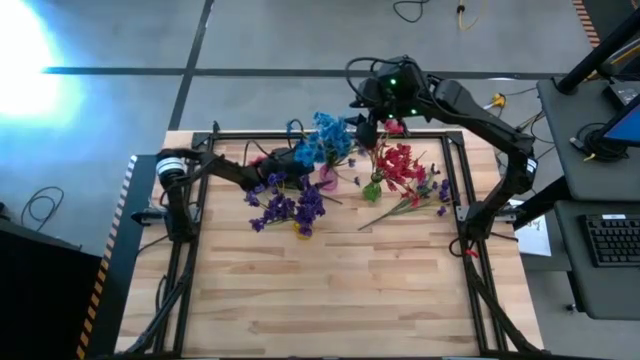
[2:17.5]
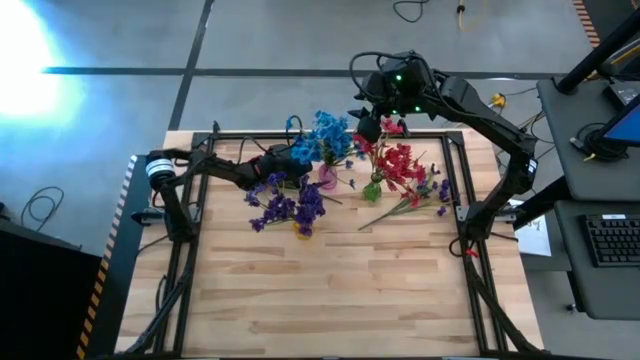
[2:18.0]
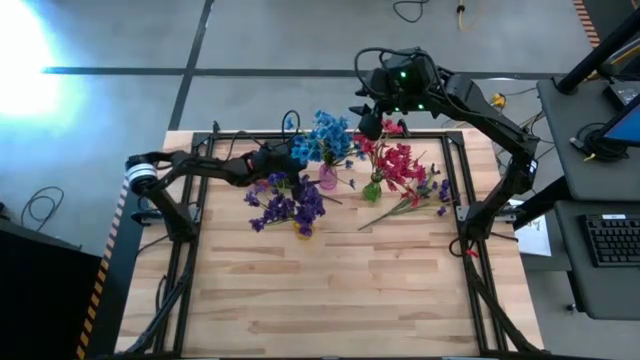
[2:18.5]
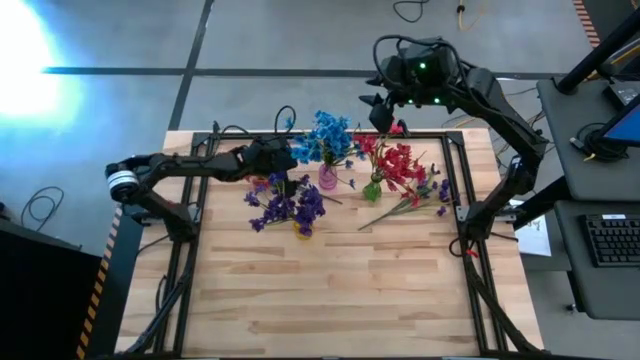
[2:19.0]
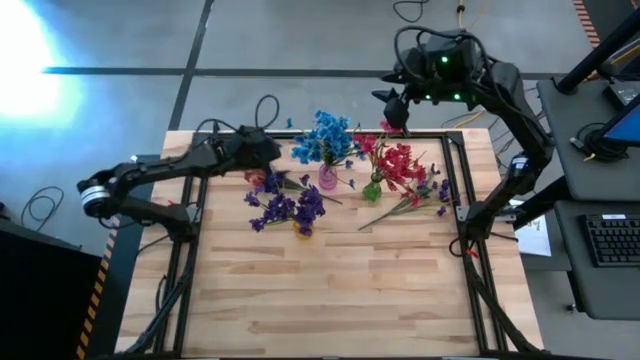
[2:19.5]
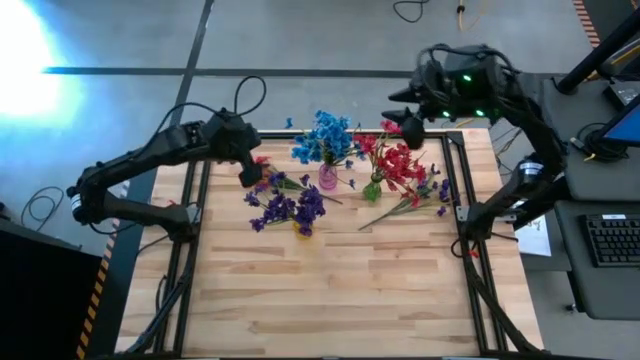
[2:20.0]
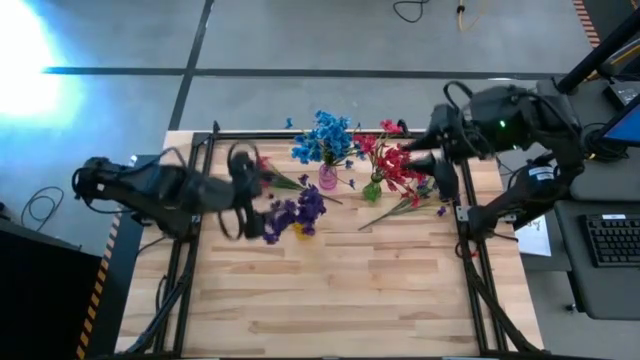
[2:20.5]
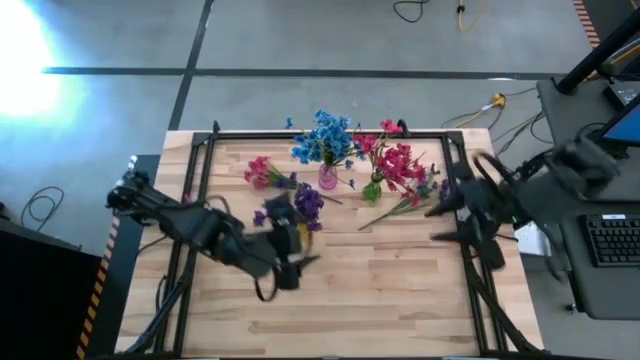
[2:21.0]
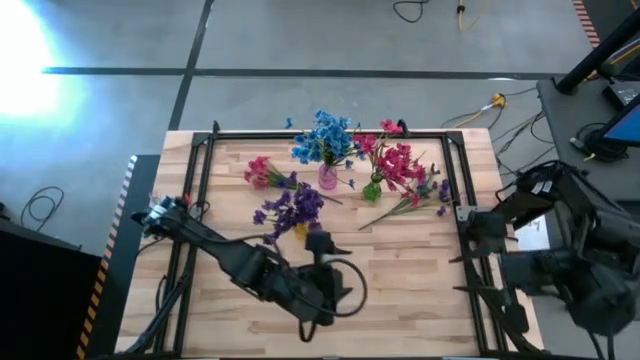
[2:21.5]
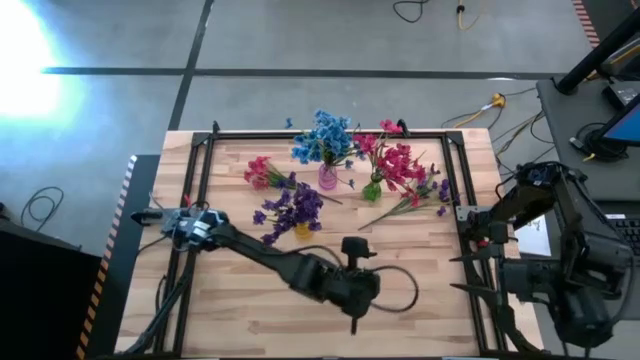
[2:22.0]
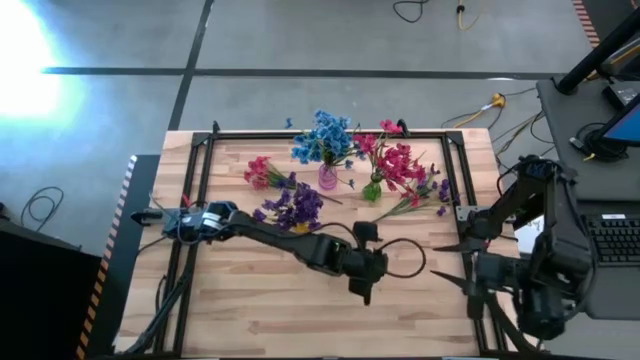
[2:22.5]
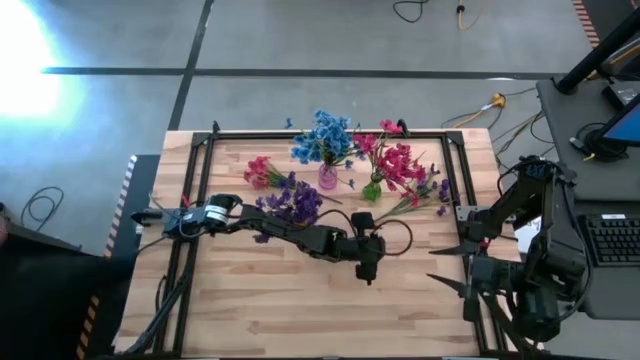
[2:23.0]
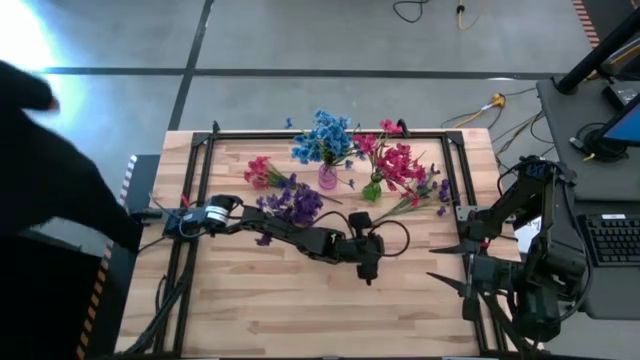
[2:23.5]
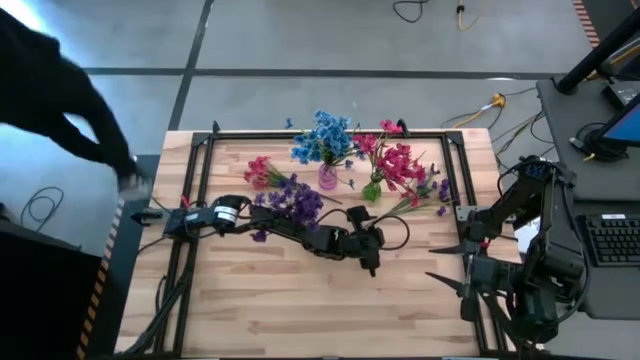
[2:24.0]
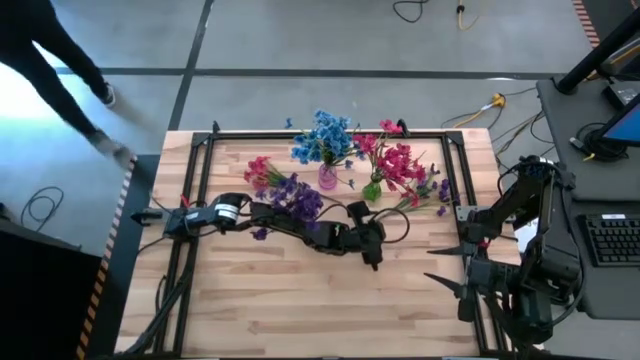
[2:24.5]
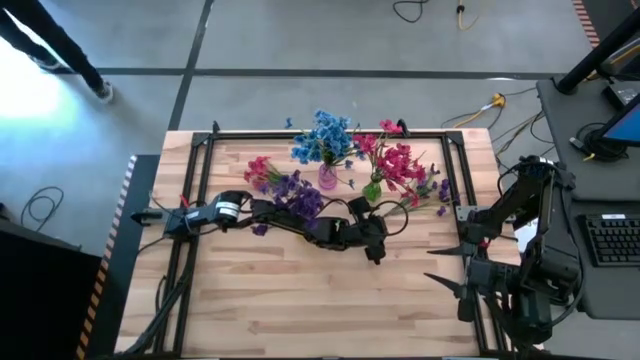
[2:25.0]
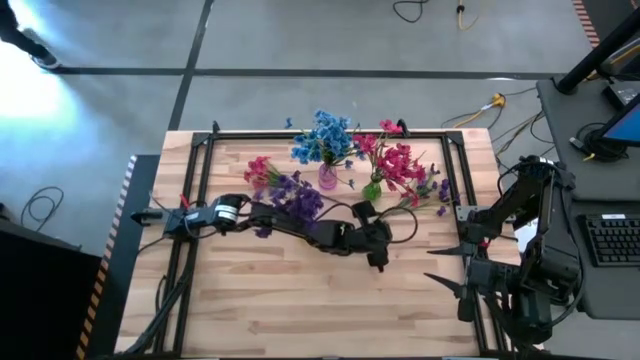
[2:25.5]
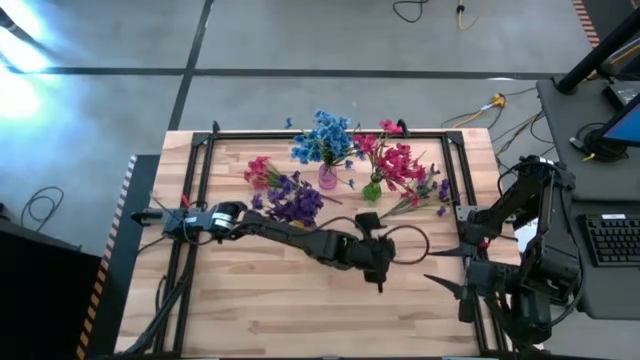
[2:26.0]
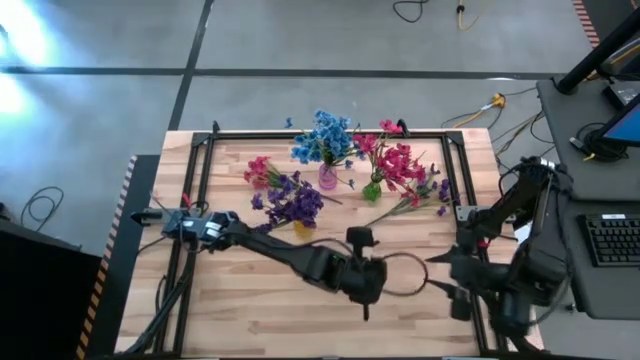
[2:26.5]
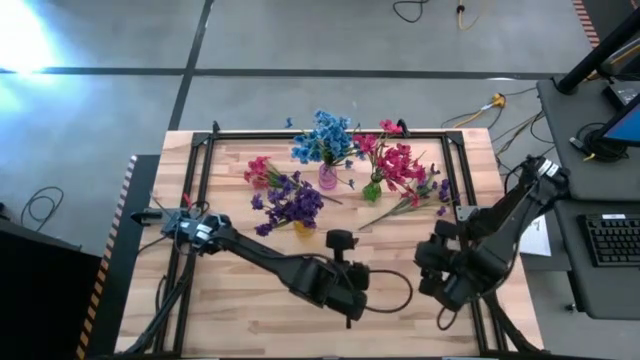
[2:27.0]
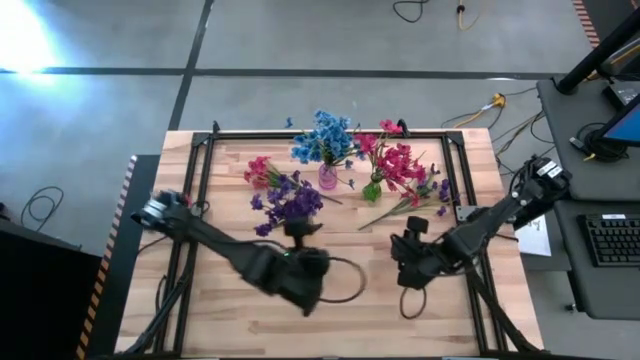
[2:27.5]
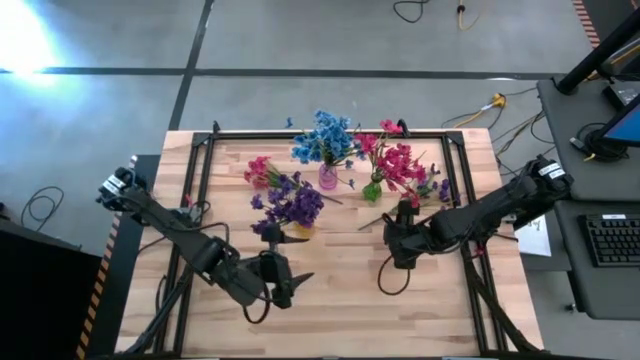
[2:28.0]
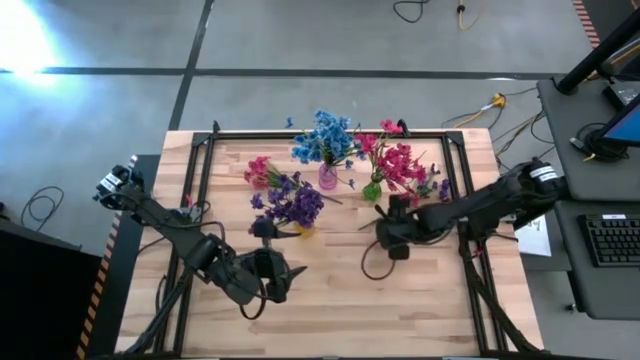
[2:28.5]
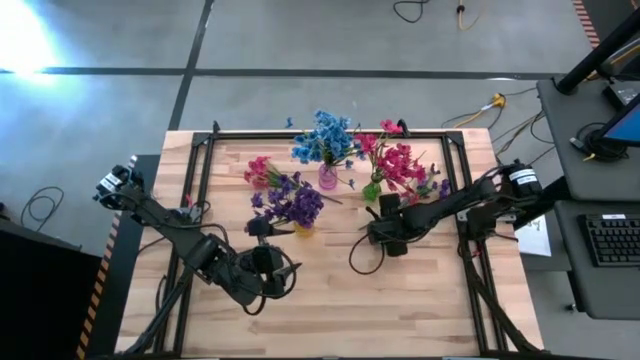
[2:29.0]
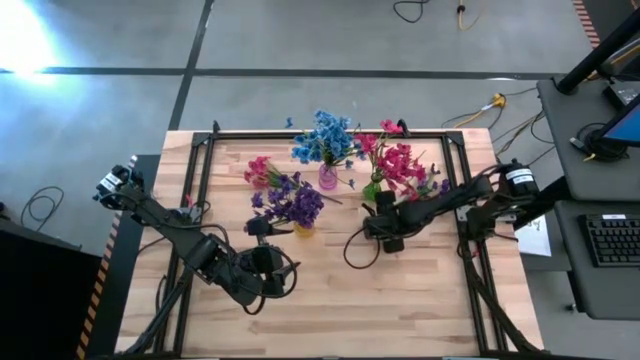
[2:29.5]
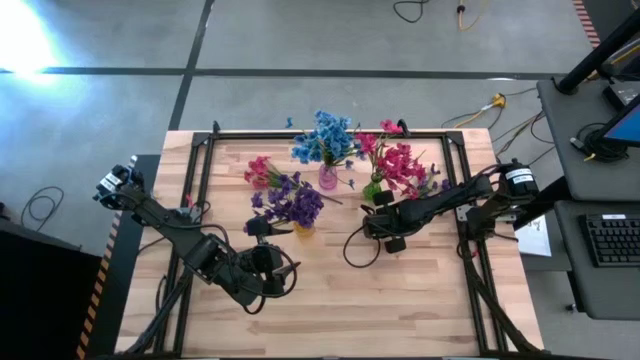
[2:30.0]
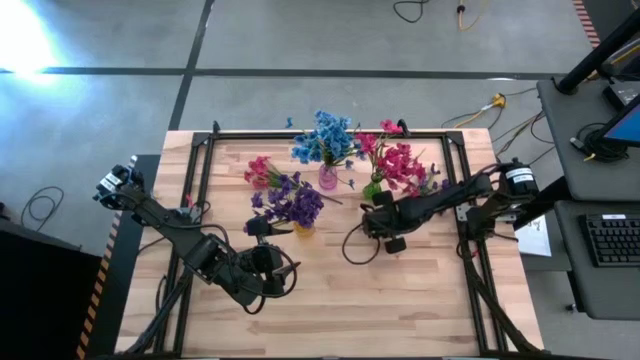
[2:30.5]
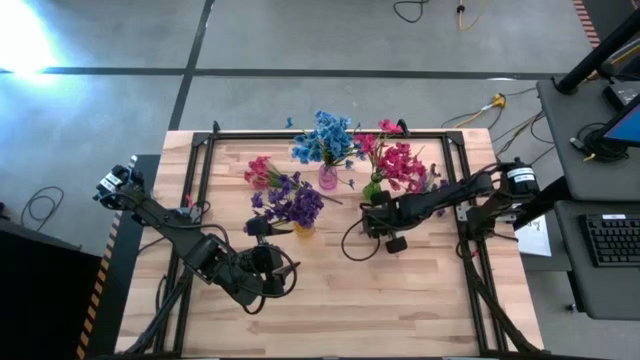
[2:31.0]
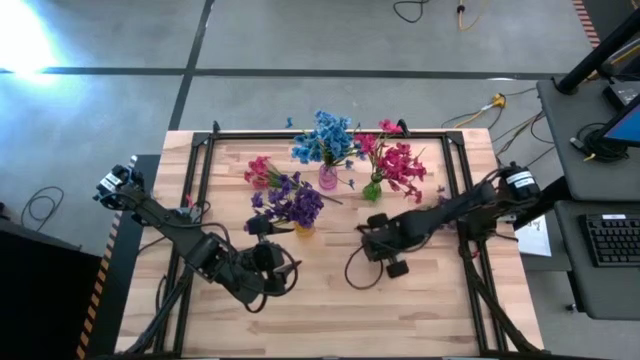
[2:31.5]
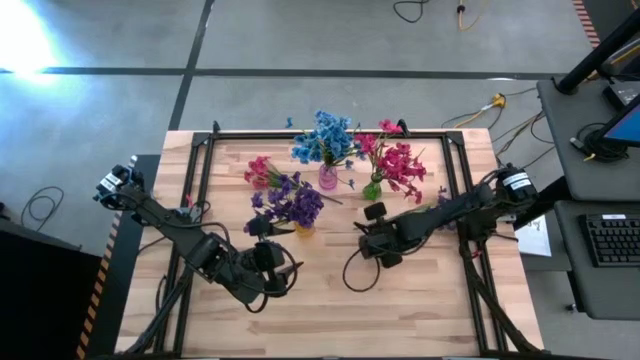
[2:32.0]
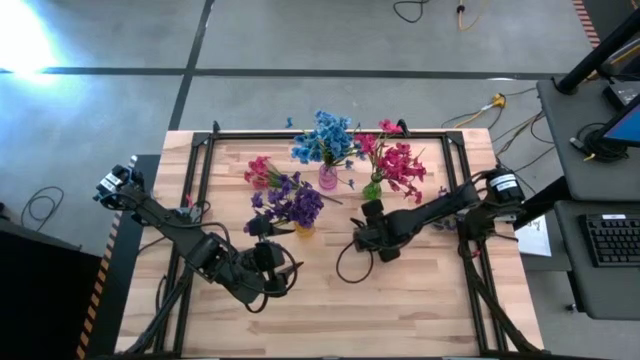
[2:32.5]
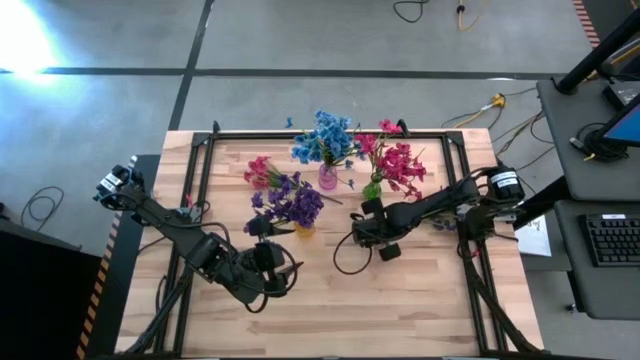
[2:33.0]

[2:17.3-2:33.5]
Task: Sort flowers into vase by color
Put the violet flowers into the yellow vase
